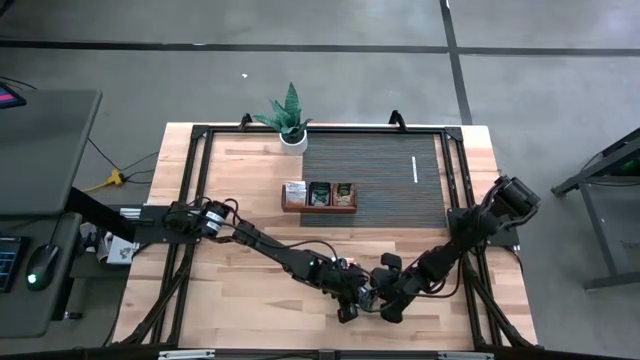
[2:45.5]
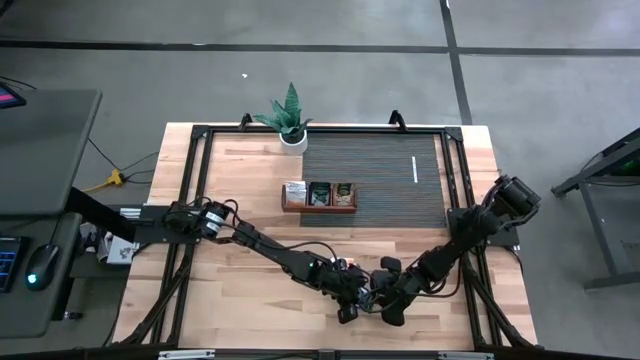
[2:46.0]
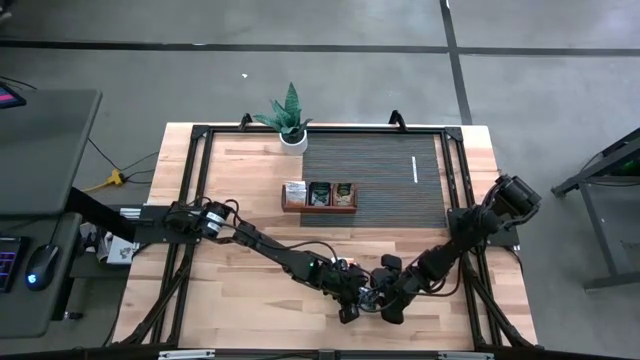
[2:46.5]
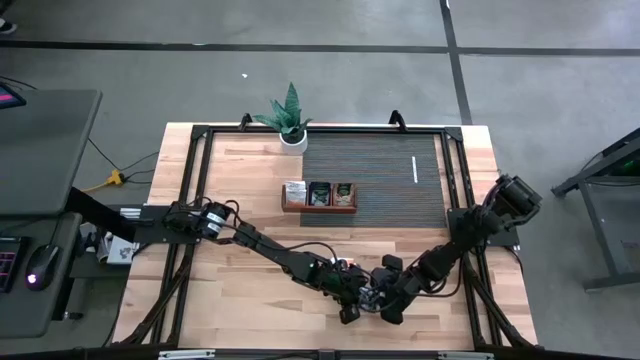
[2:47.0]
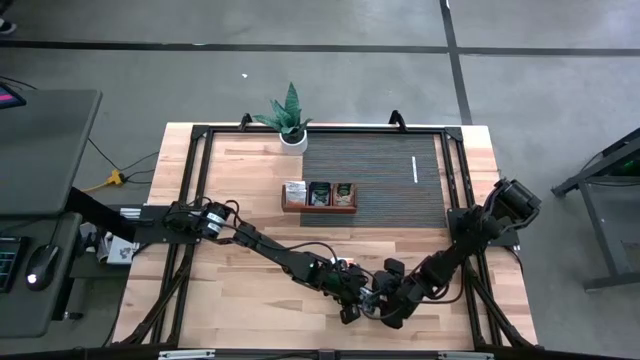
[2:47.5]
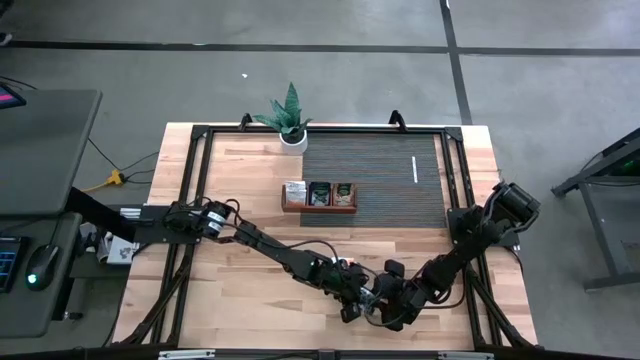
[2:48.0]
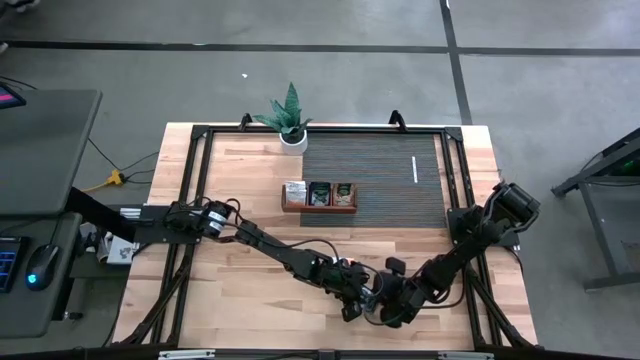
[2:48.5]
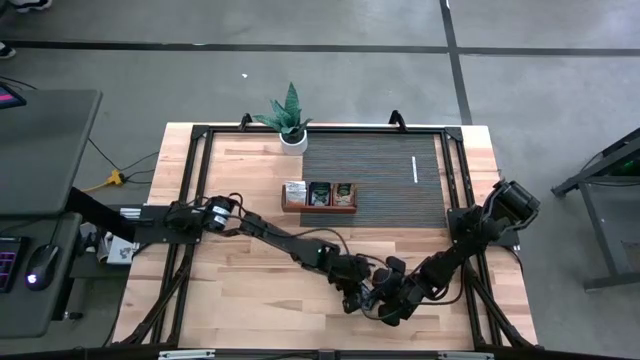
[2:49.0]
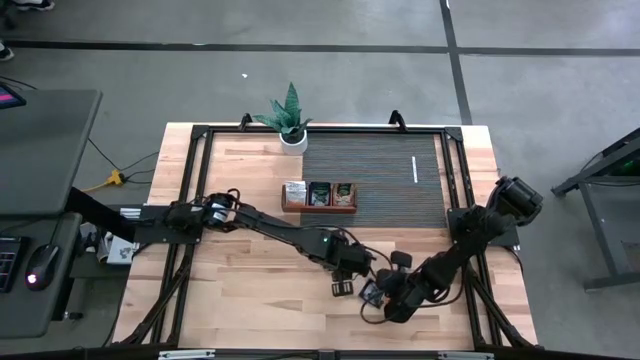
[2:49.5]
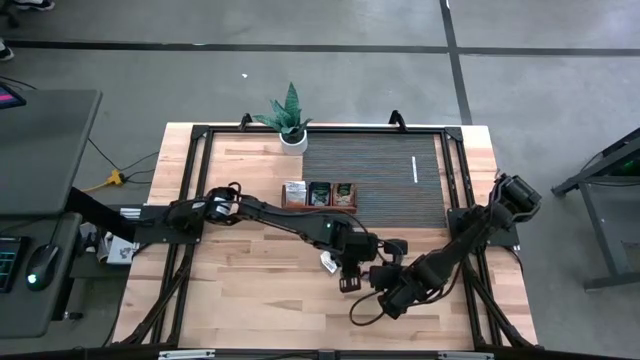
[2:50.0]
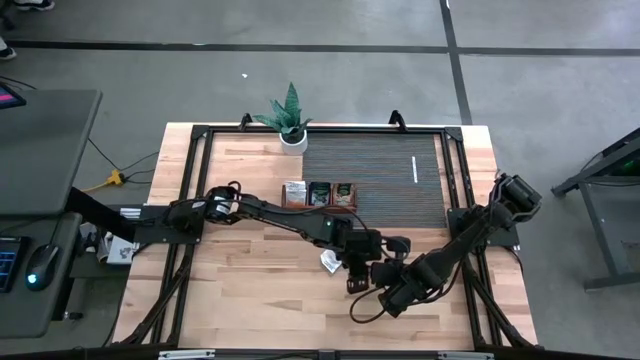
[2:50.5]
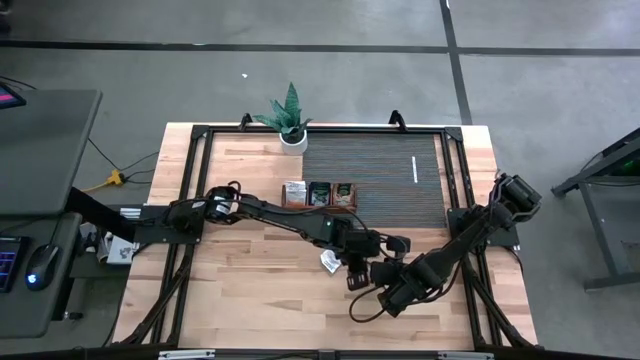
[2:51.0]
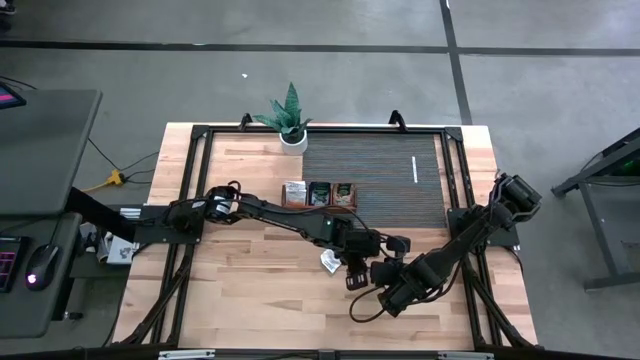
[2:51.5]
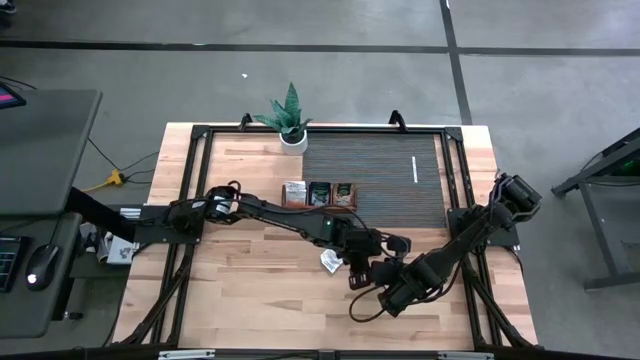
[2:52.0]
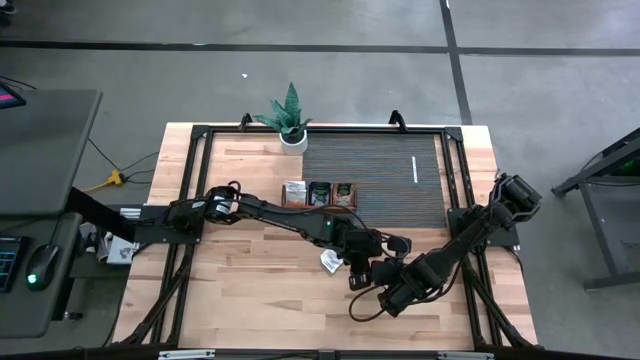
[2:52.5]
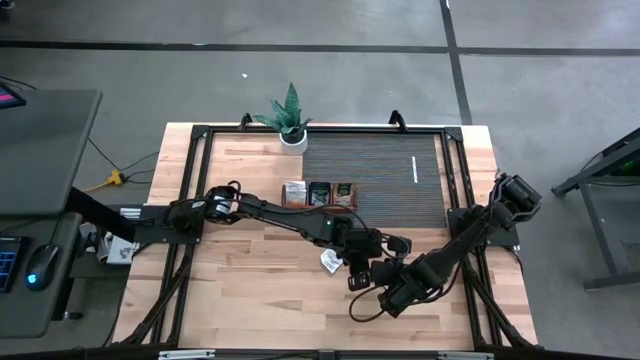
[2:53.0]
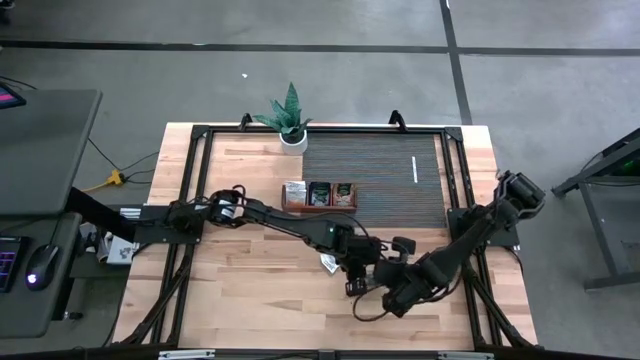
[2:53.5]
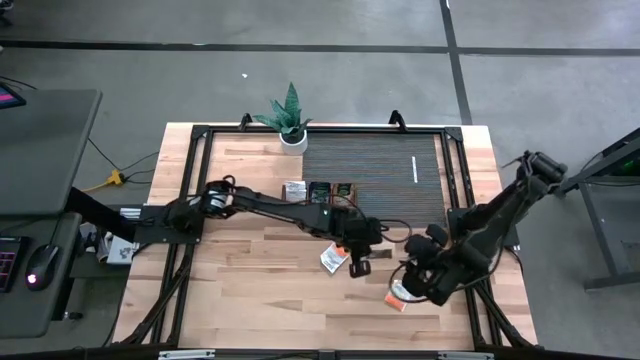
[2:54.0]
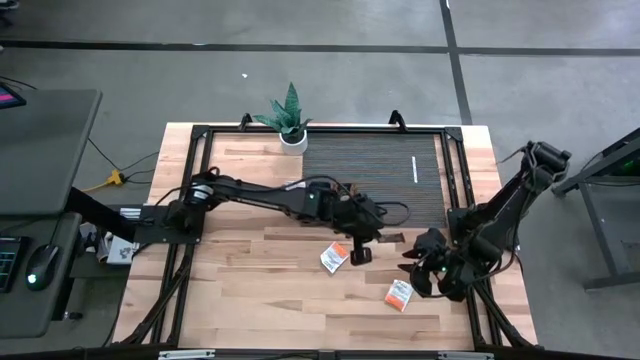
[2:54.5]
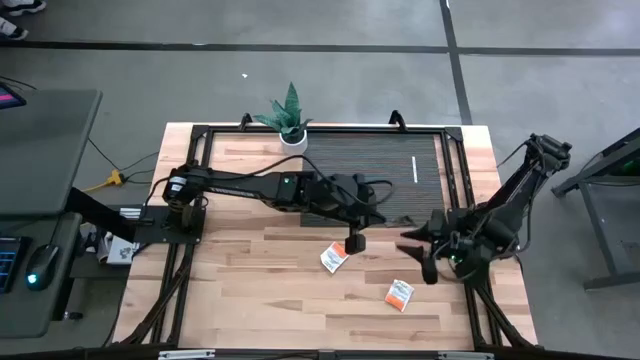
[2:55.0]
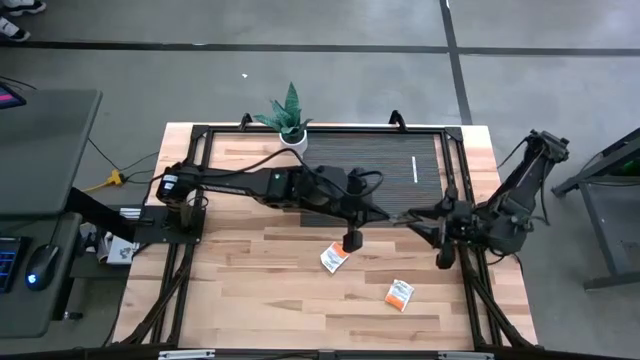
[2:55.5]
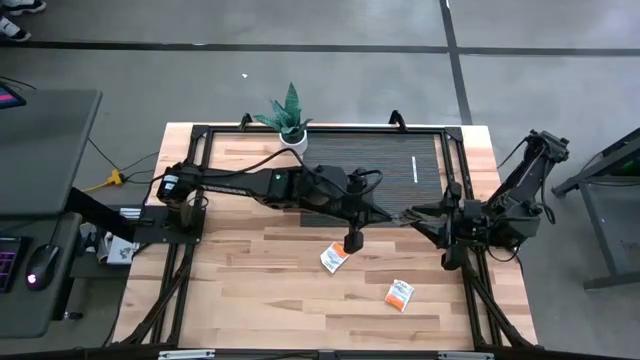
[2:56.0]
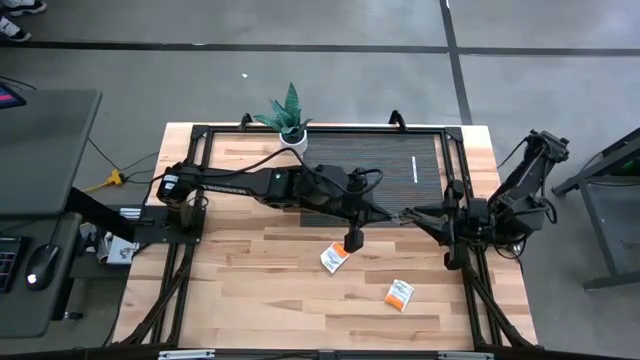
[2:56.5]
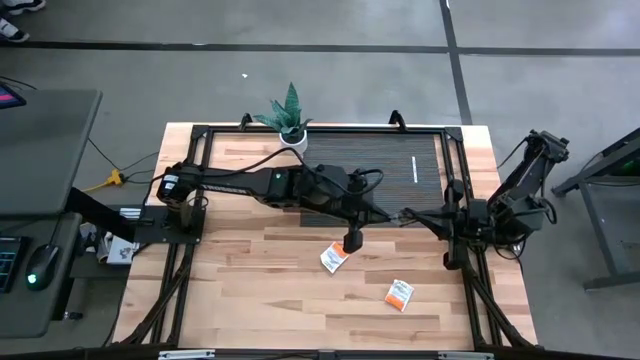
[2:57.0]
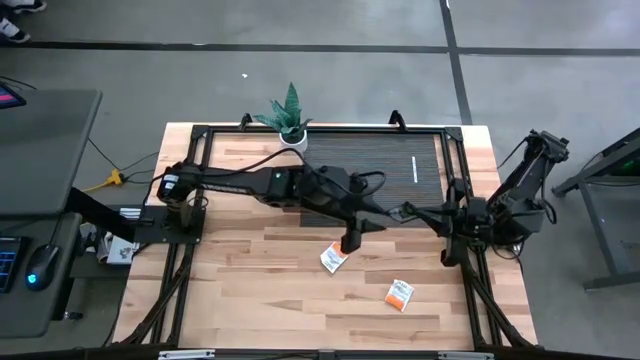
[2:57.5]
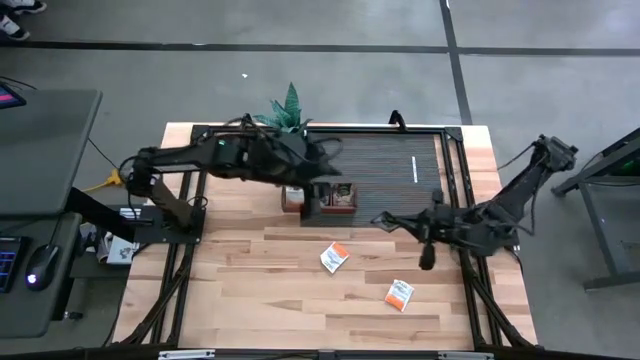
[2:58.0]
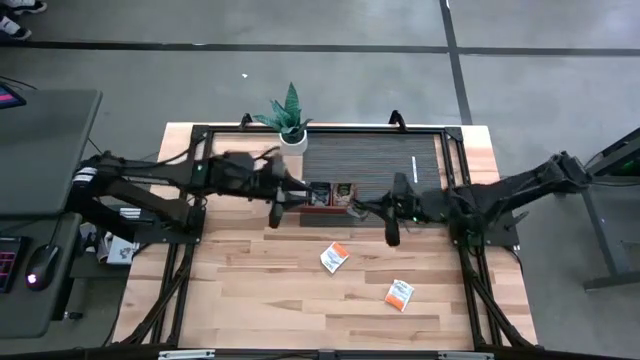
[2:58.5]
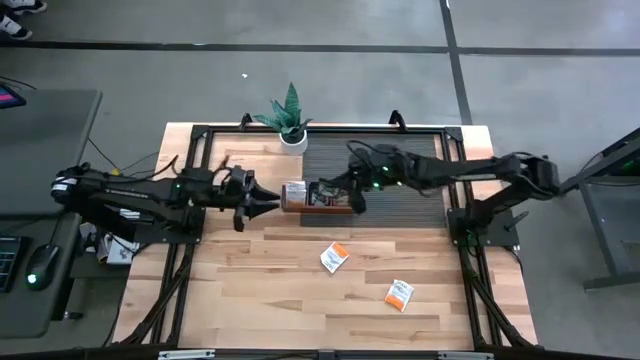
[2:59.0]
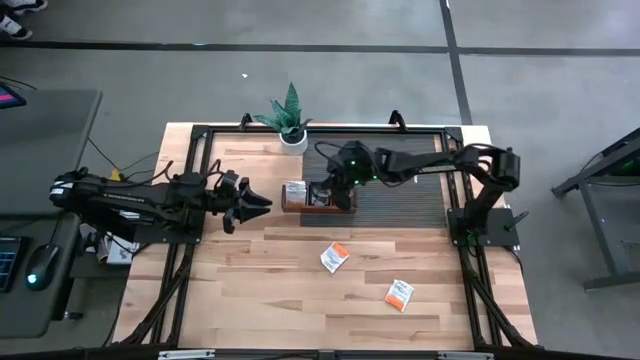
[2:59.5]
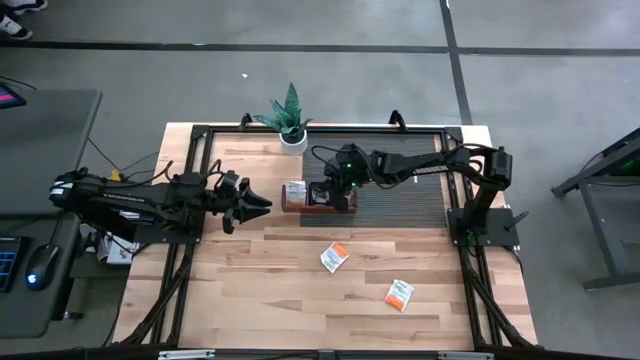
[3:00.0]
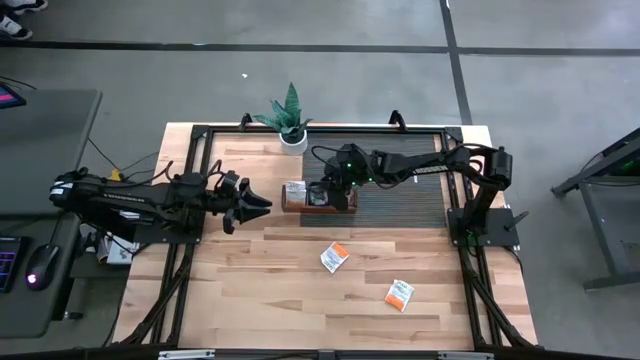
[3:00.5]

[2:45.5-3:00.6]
Task: Pick & Place Tea
Put the blue tea bag into the middle section of the wooden organizer

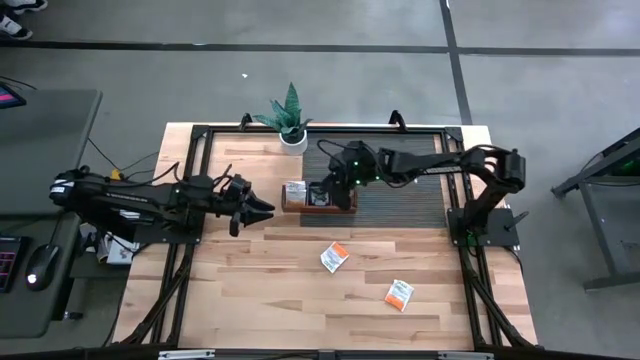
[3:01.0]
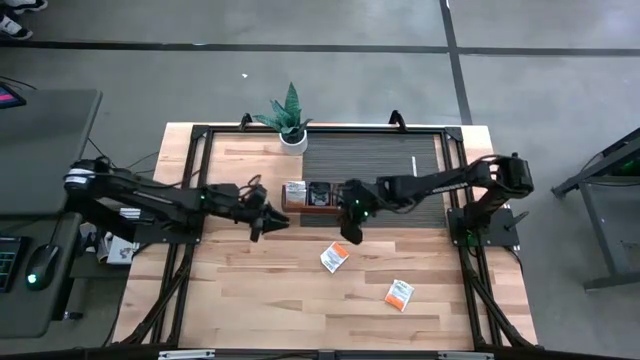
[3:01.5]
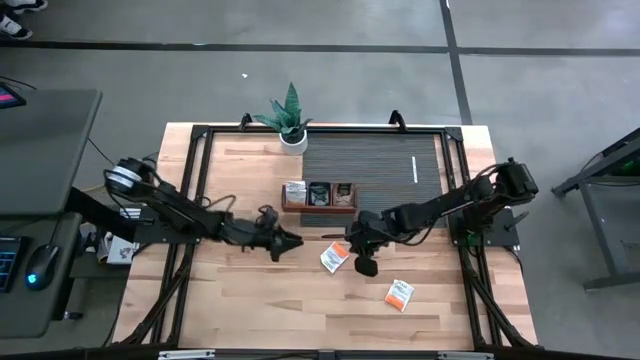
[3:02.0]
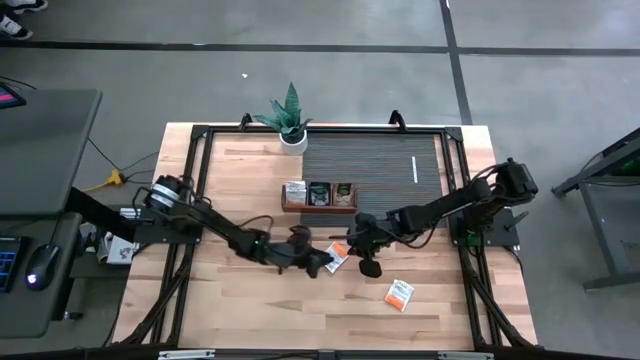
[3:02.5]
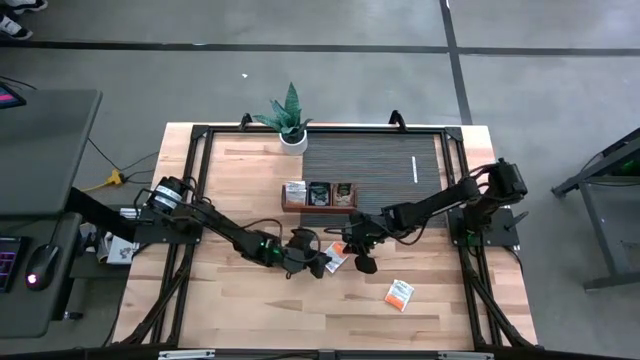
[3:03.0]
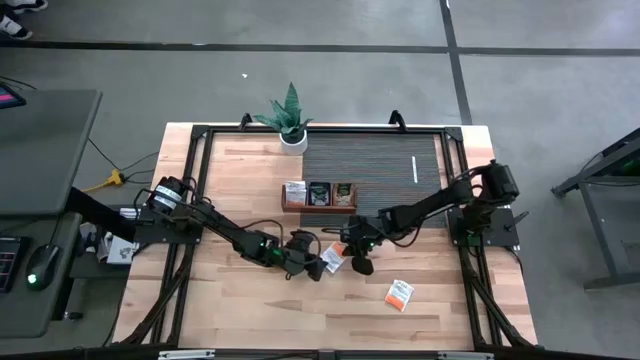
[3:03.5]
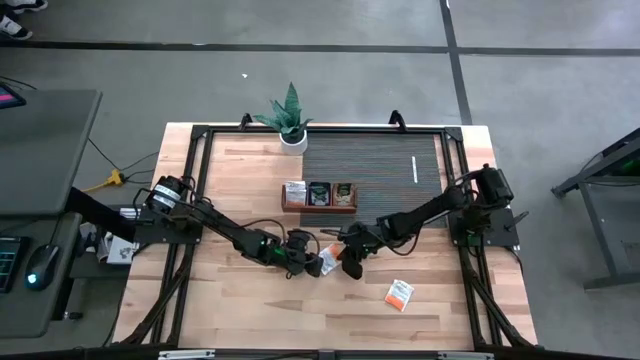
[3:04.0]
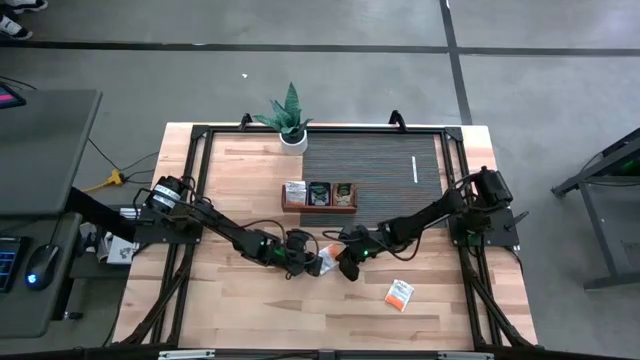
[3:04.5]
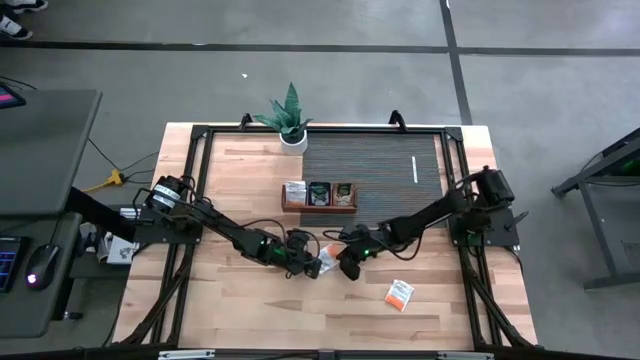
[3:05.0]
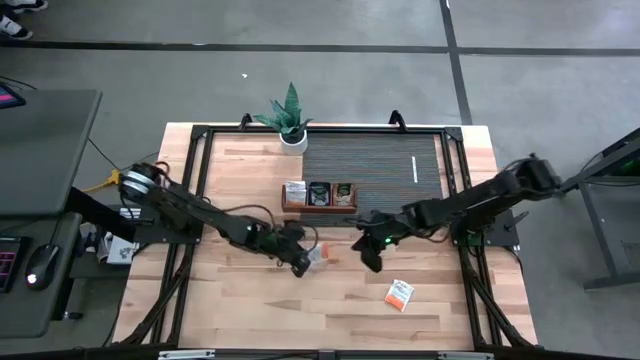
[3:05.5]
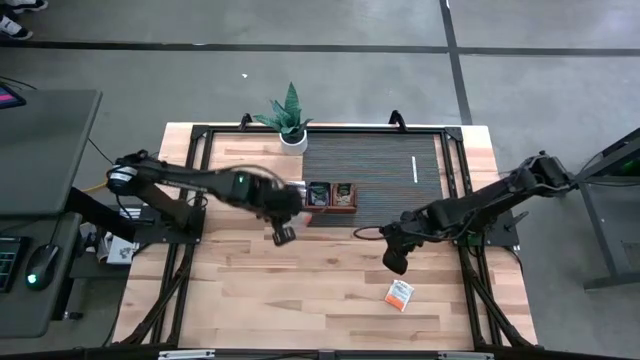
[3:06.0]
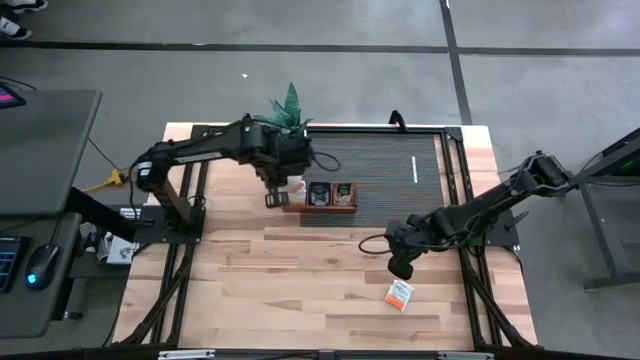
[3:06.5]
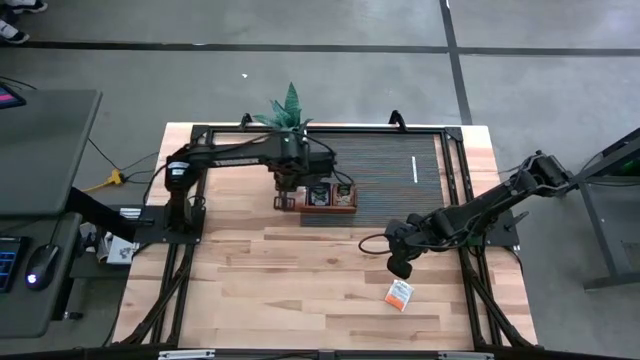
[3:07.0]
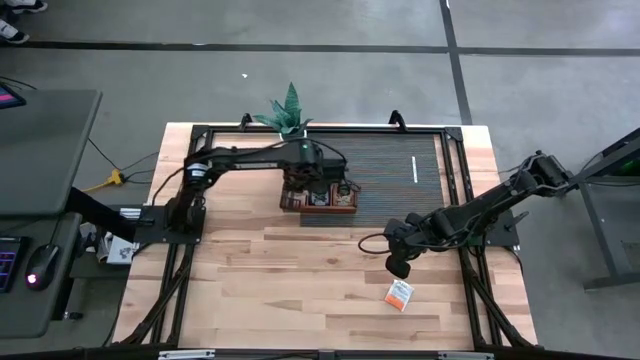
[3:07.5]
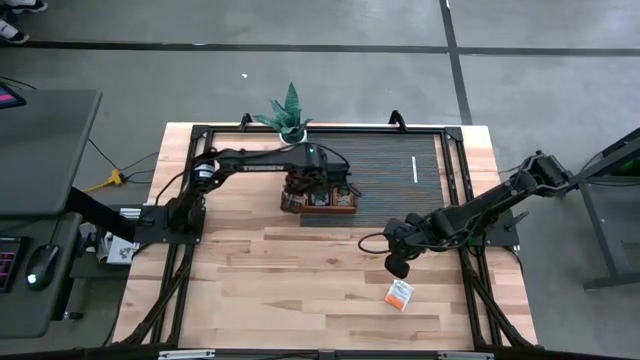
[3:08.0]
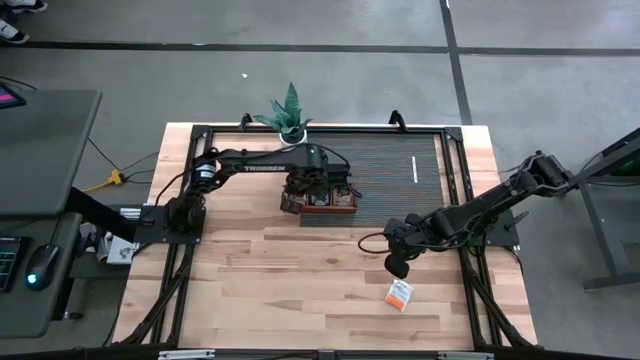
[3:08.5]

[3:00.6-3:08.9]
Put the orange tea bag into the left section of the wooden organizer
